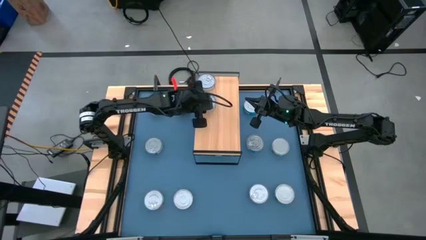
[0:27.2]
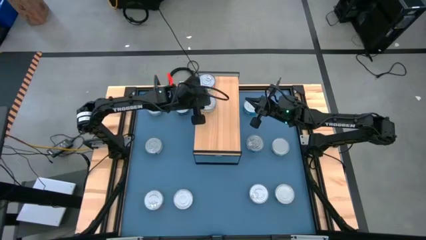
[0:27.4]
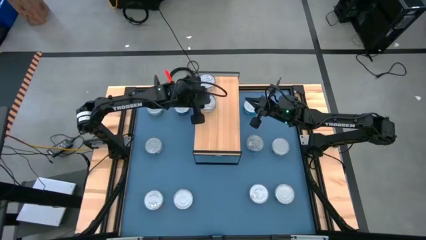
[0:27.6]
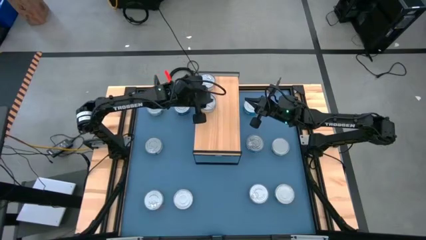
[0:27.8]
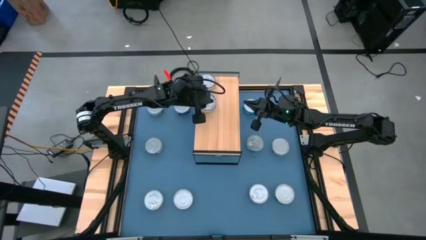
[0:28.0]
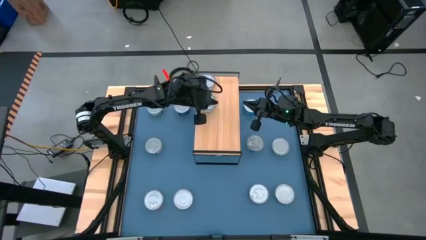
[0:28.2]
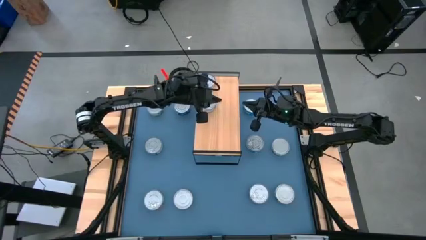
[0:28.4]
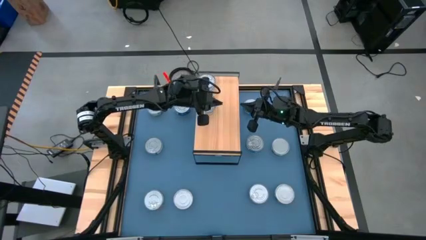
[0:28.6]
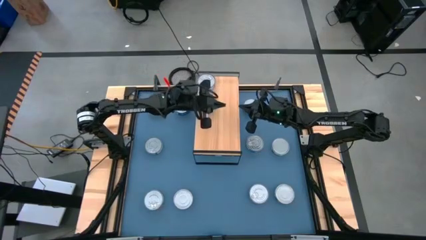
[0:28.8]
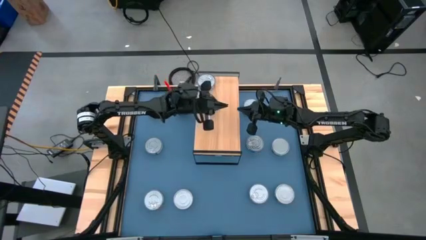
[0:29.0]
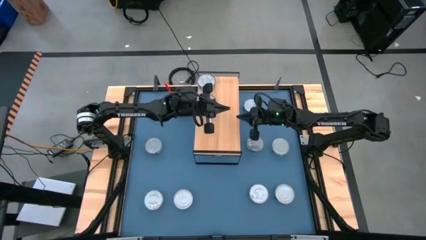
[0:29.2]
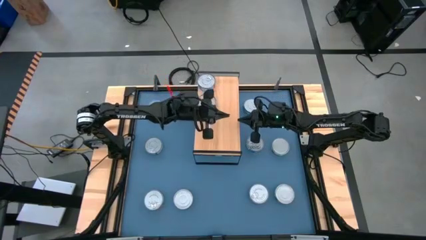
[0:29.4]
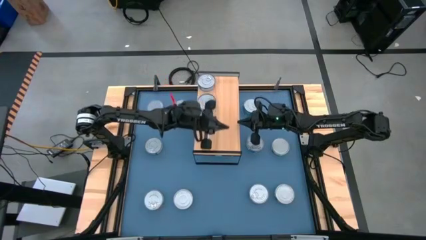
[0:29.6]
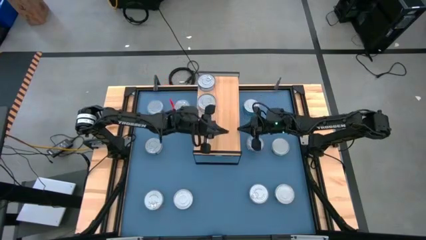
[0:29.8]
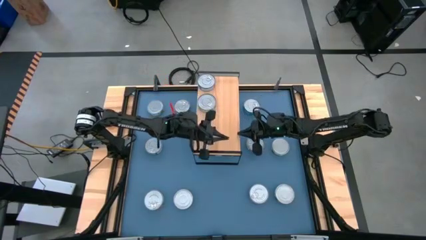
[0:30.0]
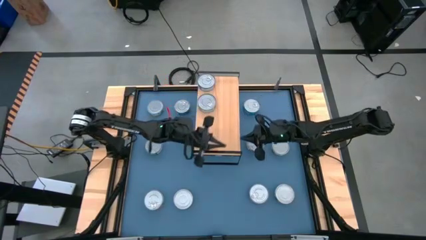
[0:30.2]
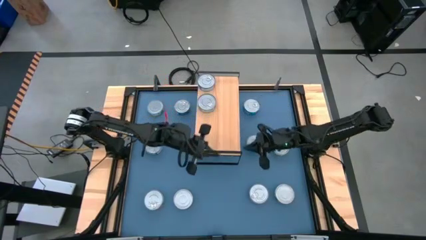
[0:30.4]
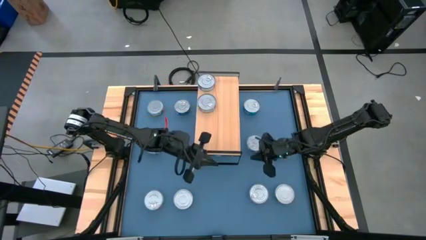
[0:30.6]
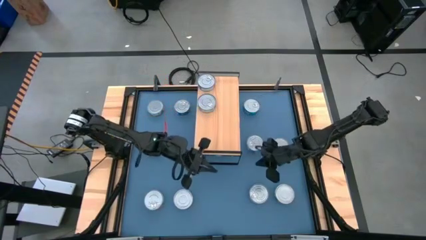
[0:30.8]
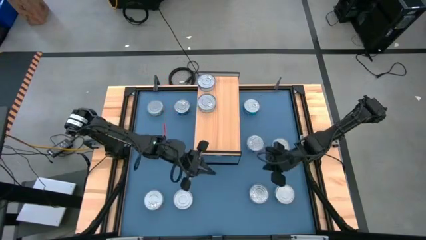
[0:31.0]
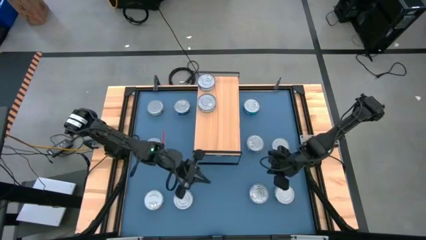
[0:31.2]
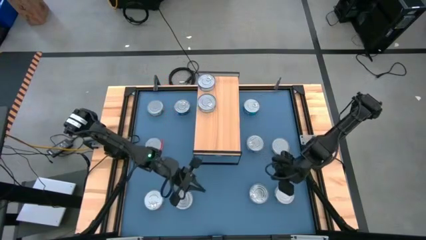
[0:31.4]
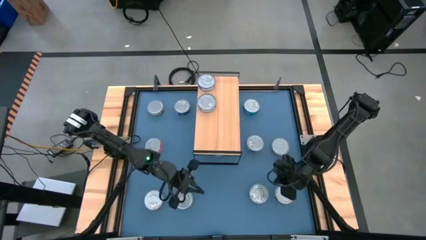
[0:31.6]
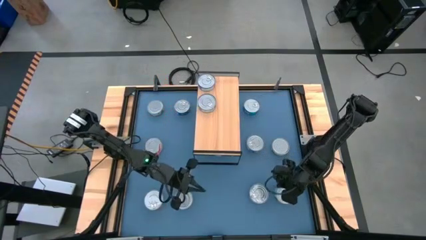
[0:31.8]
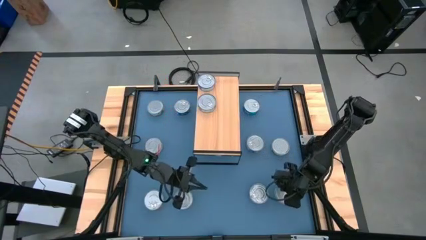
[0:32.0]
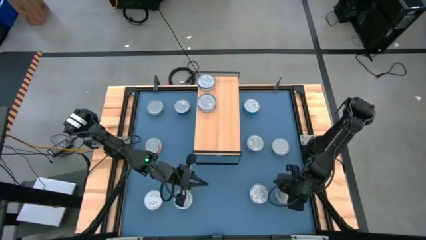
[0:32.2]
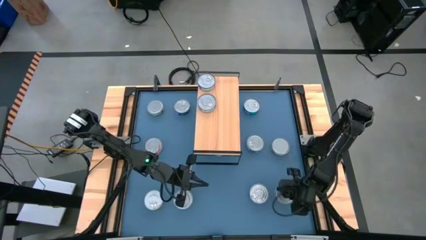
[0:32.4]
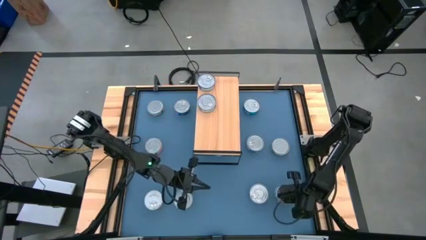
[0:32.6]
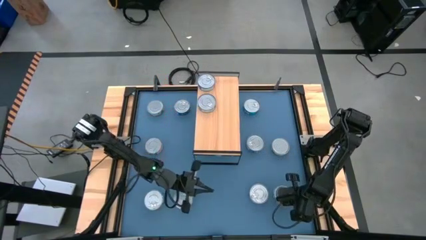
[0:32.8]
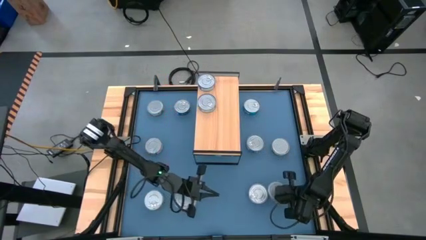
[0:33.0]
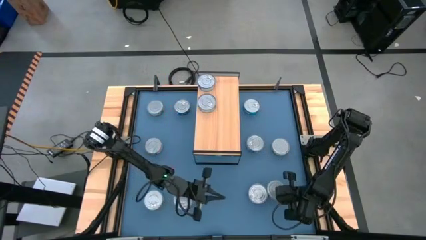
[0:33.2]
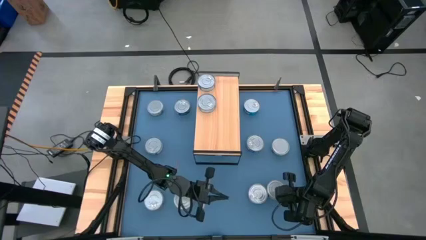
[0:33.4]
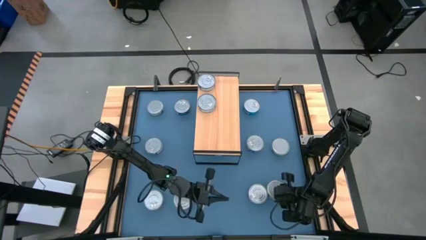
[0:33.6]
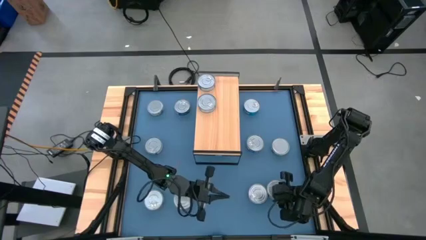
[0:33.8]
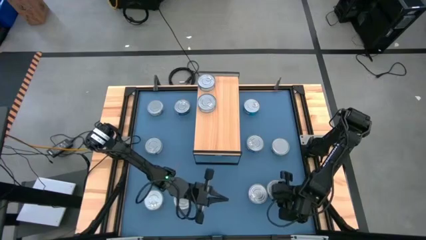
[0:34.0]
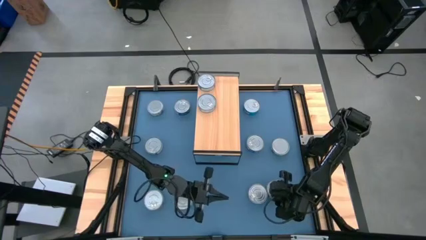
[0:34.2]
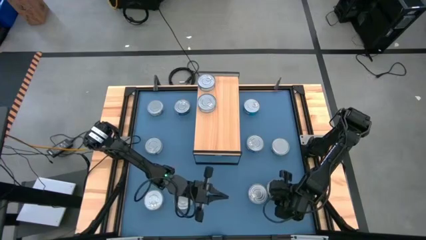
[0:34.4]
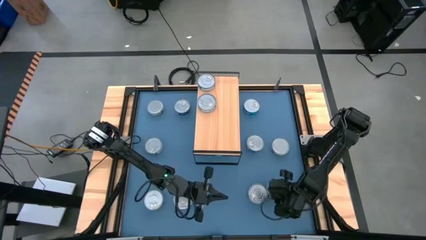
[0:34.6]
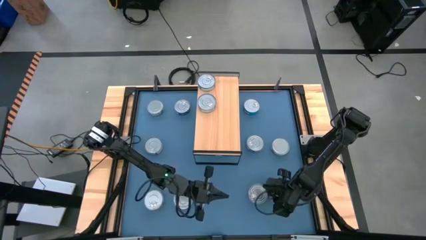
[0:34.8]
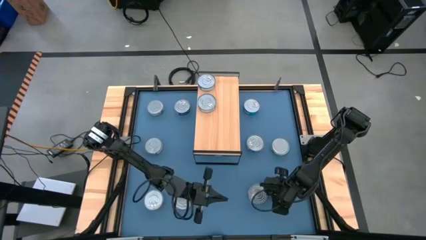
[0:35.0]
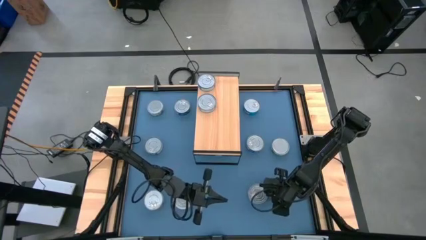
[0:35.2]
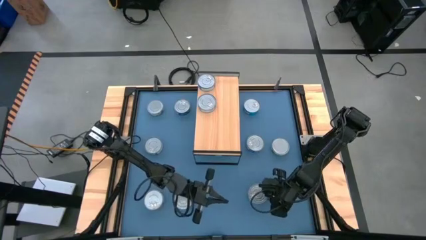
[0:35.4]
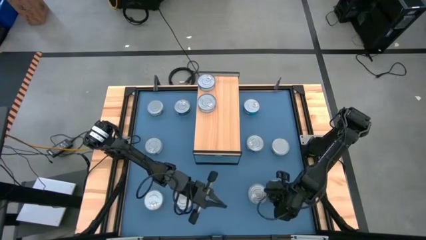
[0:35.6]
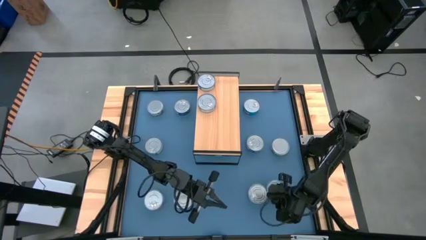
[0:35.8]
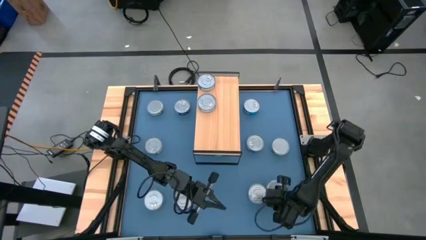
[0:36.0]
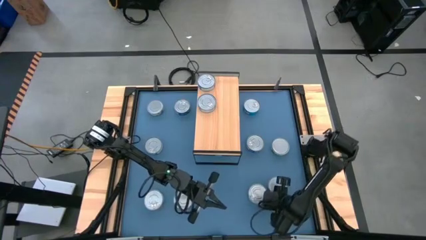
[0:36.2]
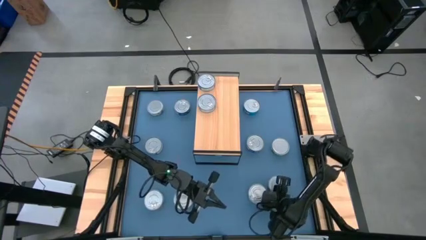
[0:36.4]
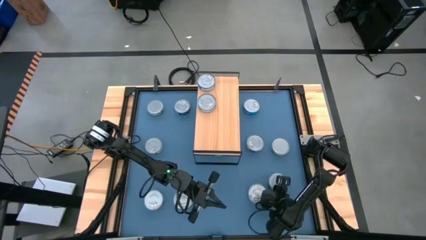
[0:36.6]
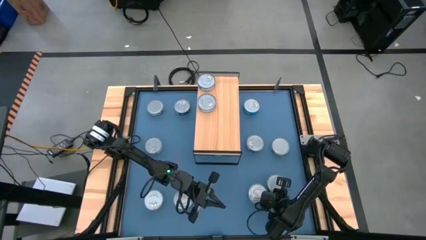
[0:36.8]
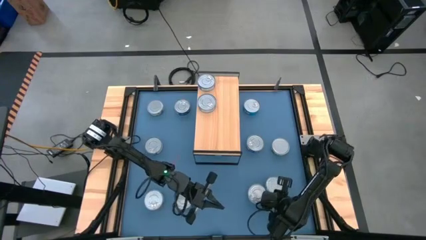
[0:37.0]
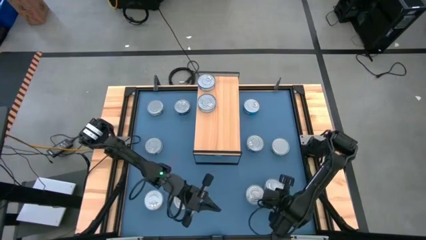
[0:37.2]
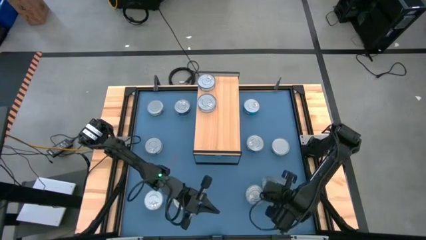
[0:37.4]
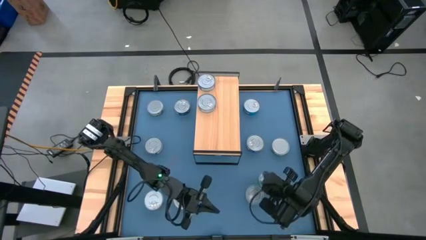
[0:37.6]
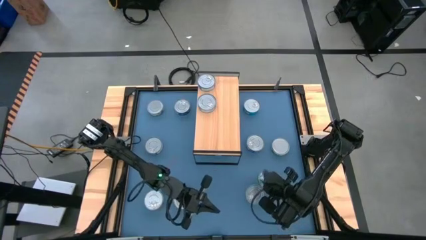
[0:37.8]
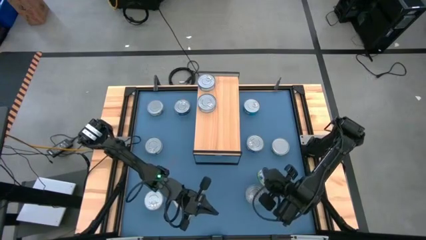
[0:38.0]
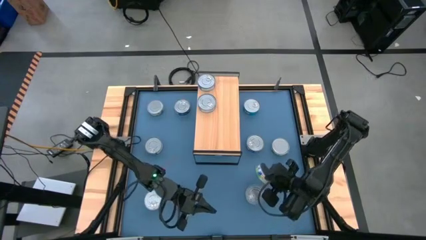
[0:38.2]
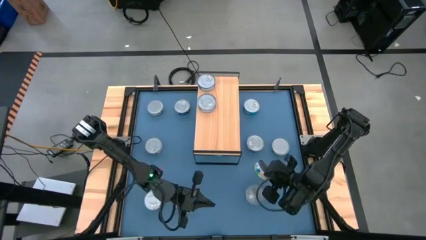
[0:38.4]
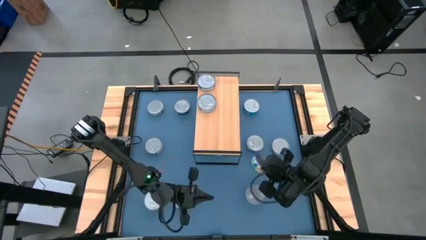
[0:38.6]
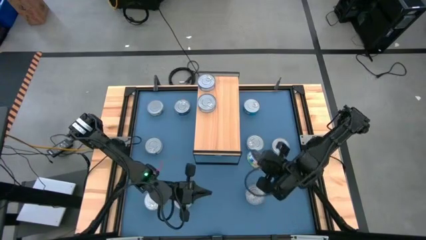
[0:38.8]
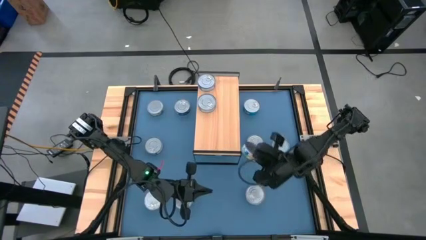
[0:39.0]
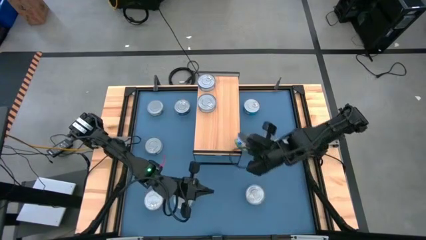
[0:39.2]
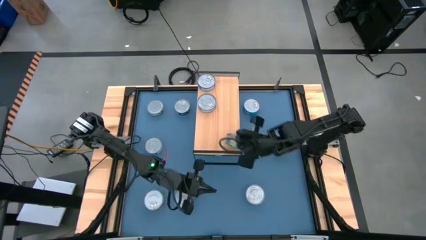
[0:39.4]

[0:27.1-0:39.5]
Task: Stack canned seafood by type on shelf
Put the green tuna can on the shelf

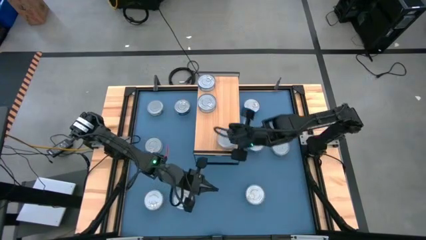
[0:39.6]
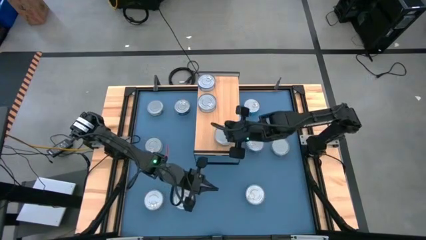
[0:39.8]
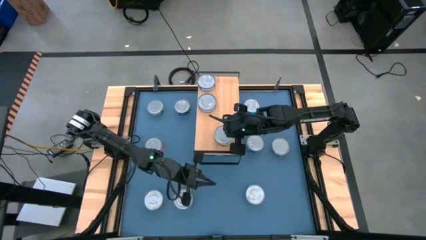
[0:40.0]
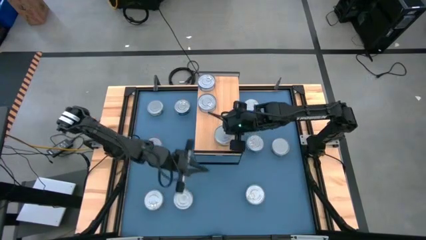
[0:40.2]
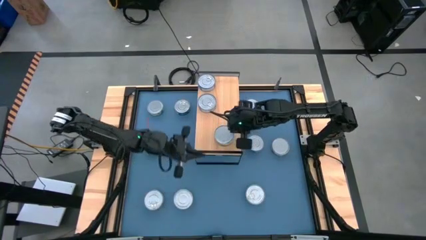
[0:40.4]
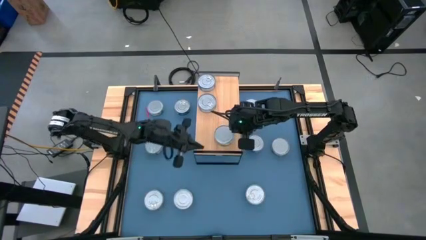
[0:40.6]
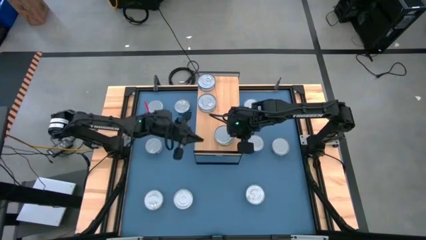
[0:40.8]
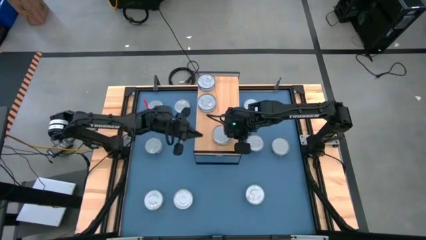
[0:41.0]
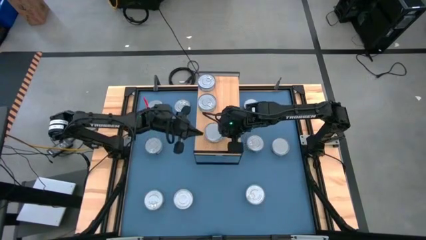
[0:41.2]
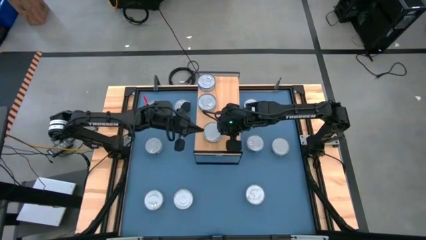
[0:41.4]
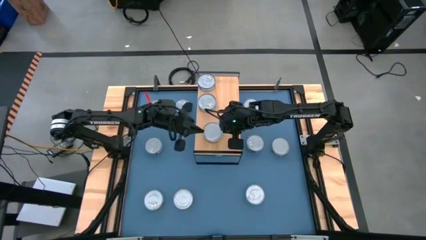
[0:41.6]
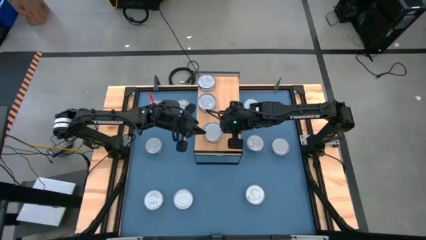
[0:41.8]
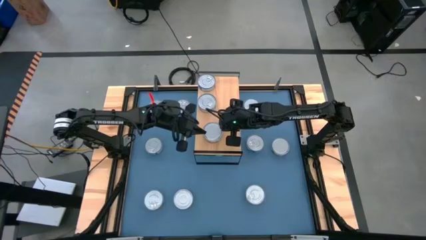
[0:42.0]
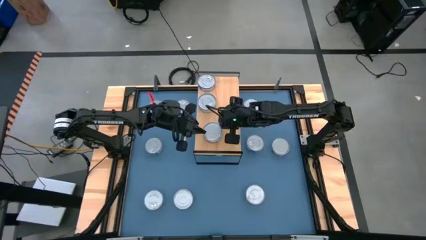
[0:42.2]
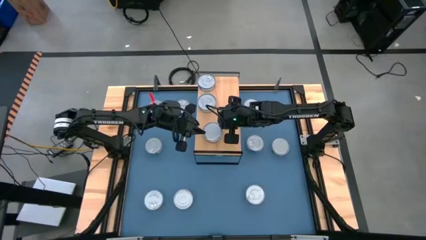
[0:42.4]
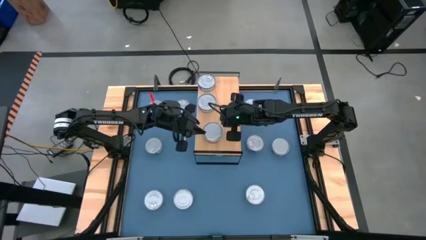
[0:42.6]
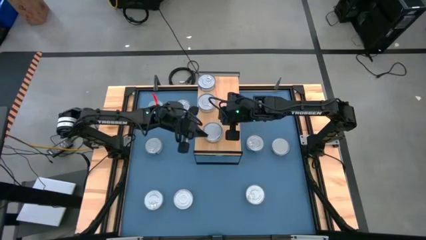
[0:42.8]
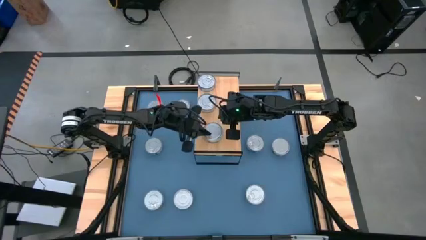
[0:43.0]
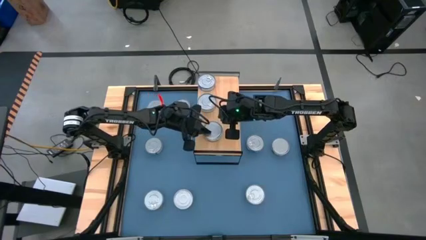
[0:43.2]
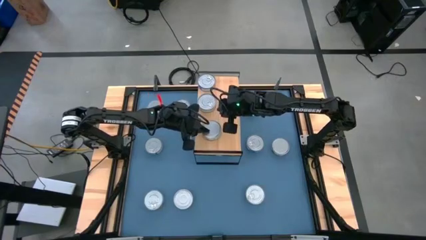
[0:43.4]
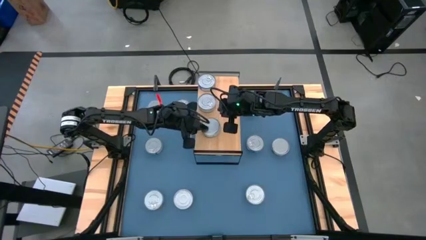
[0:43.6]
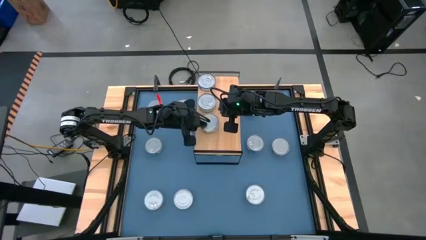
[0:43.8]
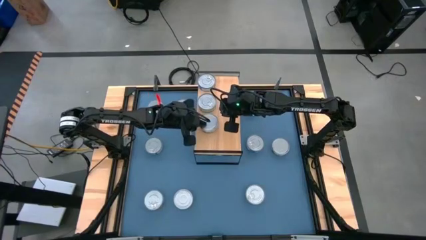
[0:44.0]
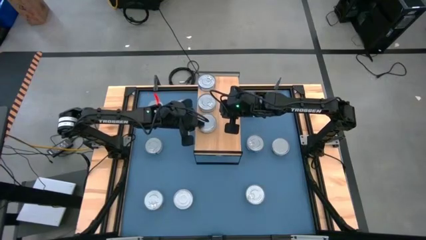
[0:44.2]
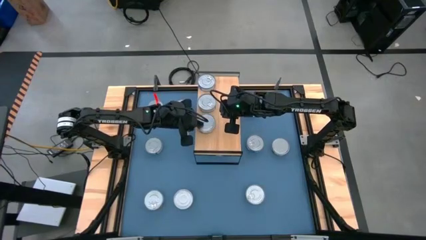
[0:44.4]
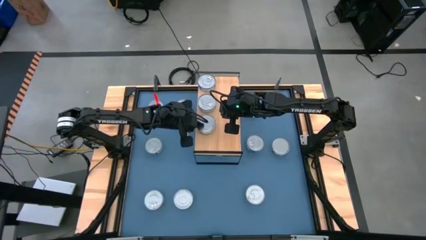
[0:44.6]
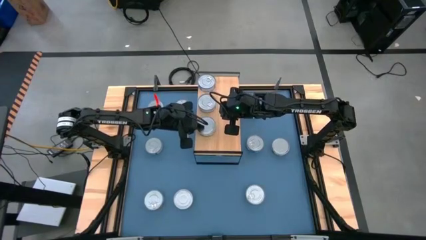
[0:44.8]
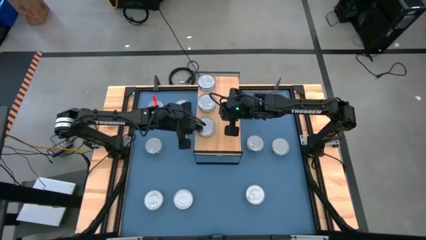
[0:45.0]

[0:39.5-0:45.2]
Put the green tuna can on the shelf
